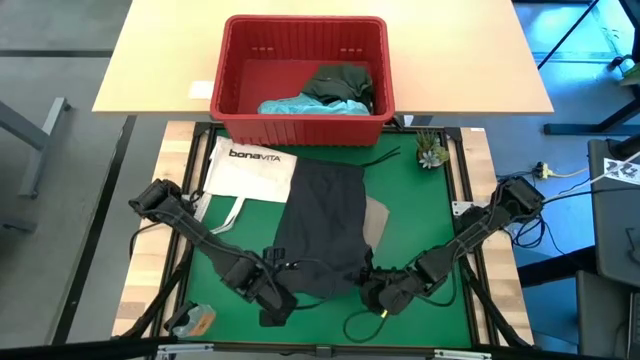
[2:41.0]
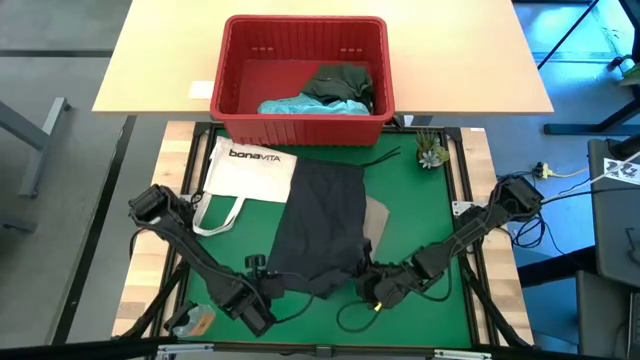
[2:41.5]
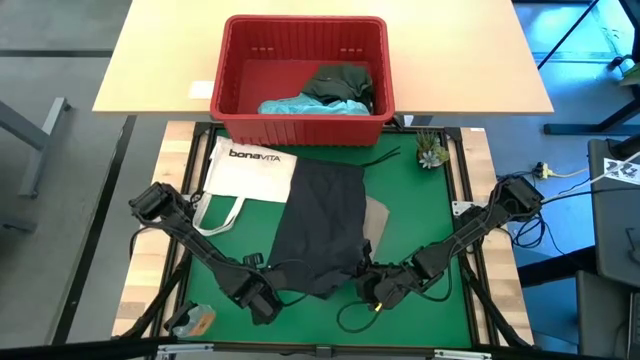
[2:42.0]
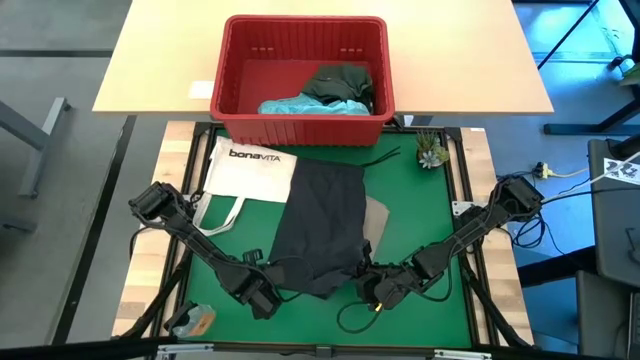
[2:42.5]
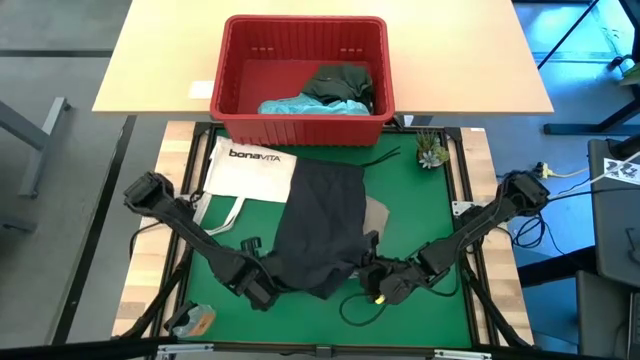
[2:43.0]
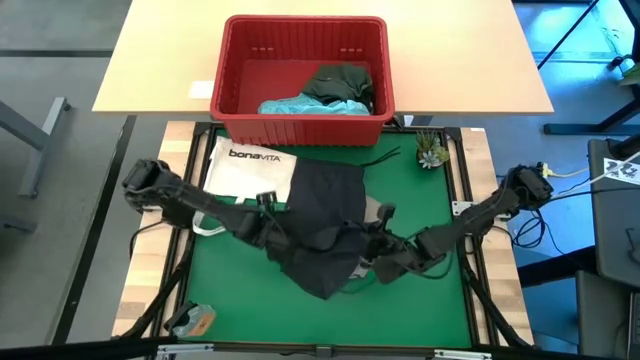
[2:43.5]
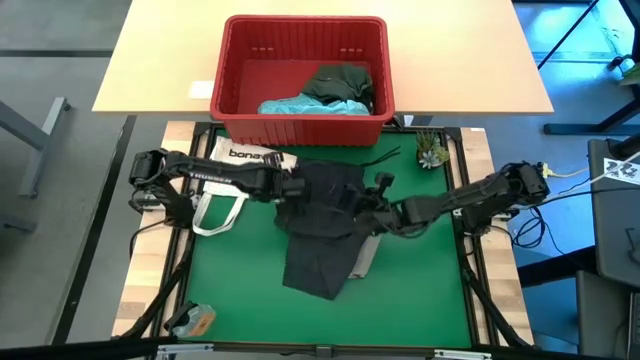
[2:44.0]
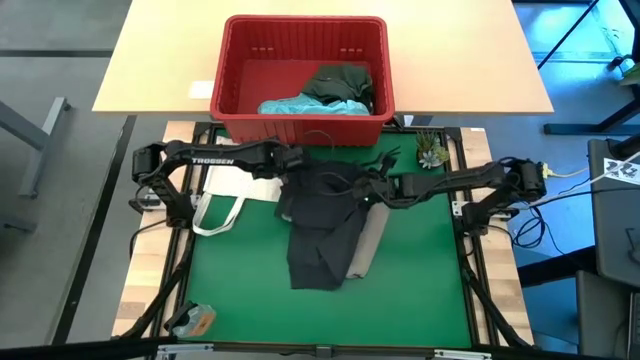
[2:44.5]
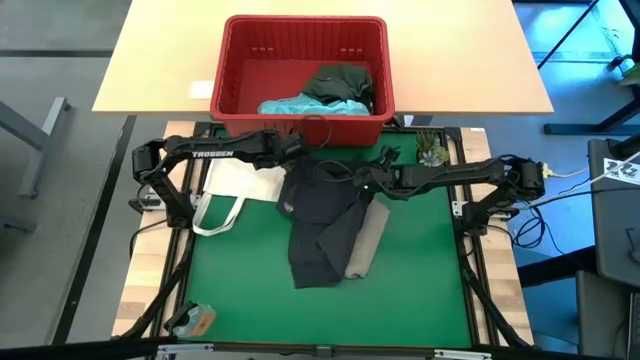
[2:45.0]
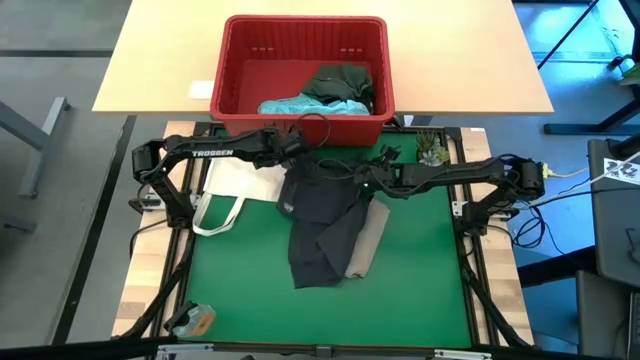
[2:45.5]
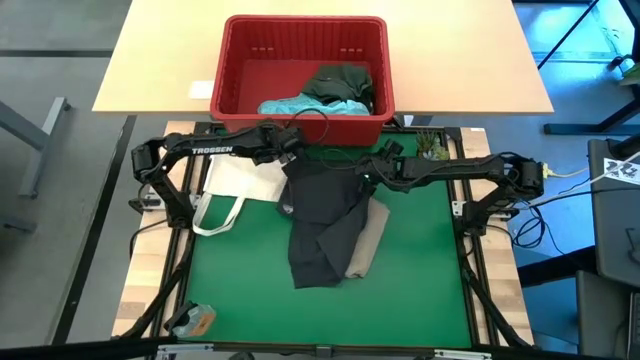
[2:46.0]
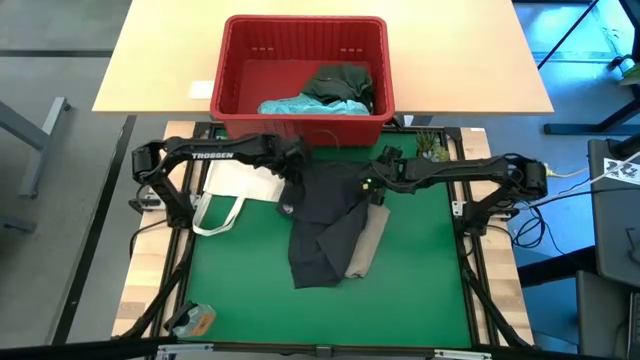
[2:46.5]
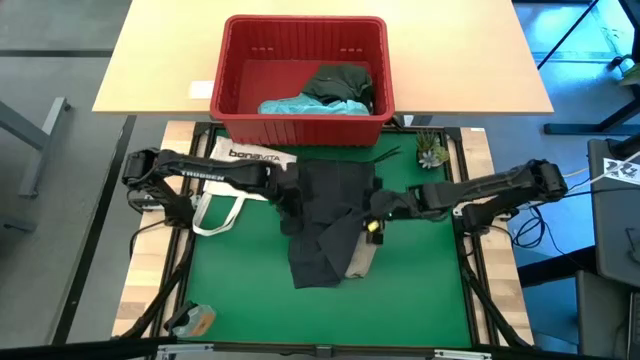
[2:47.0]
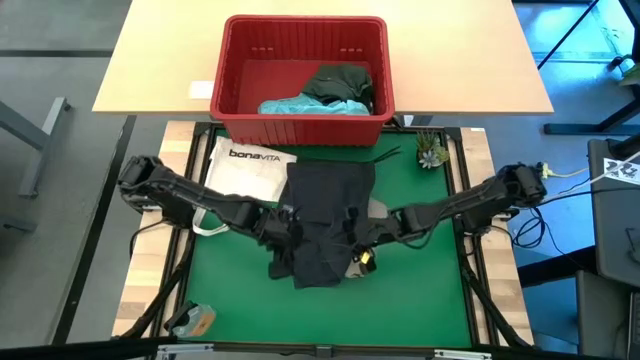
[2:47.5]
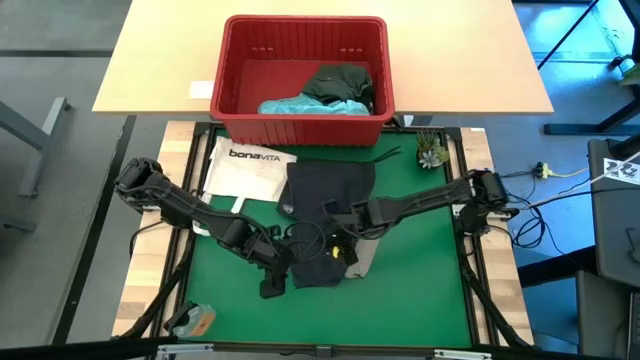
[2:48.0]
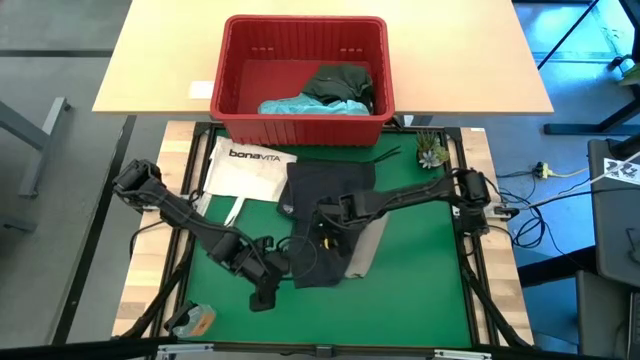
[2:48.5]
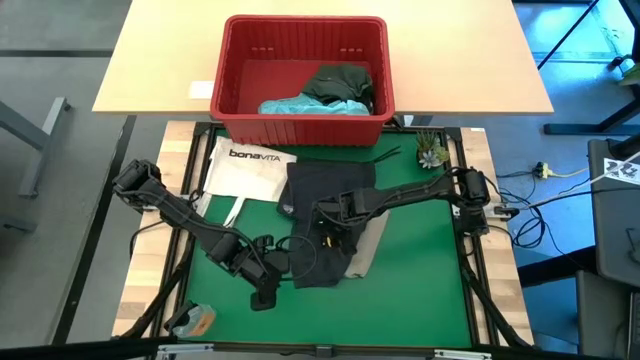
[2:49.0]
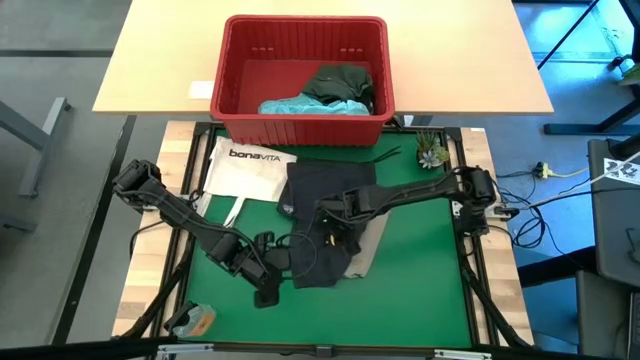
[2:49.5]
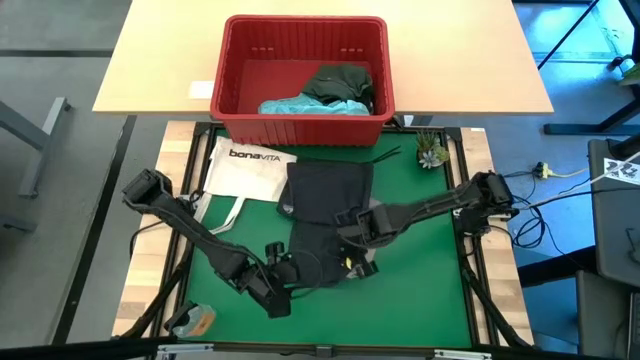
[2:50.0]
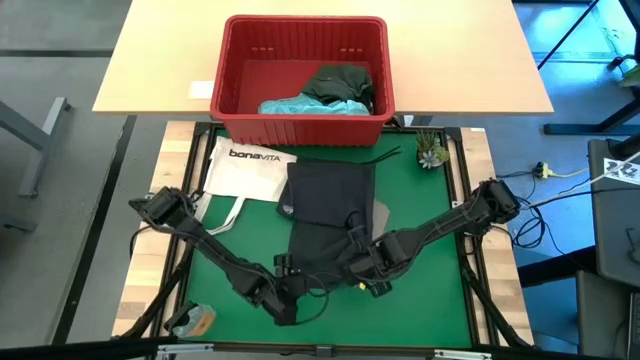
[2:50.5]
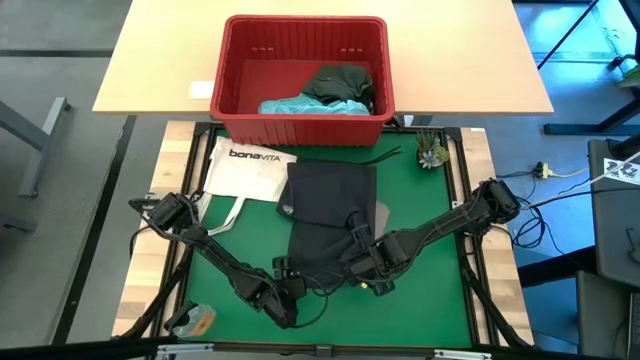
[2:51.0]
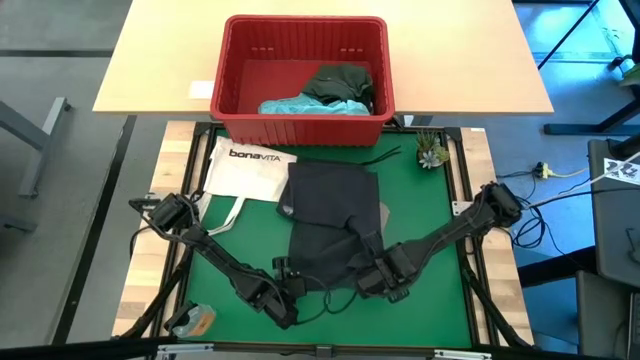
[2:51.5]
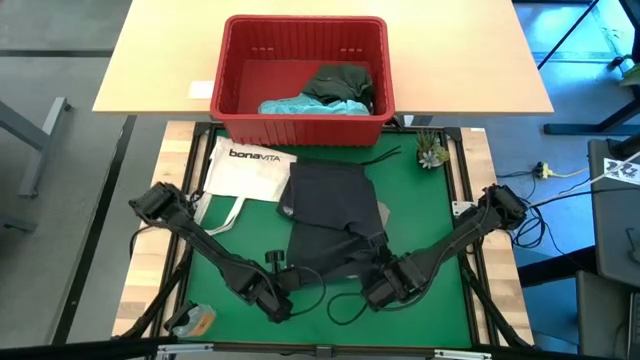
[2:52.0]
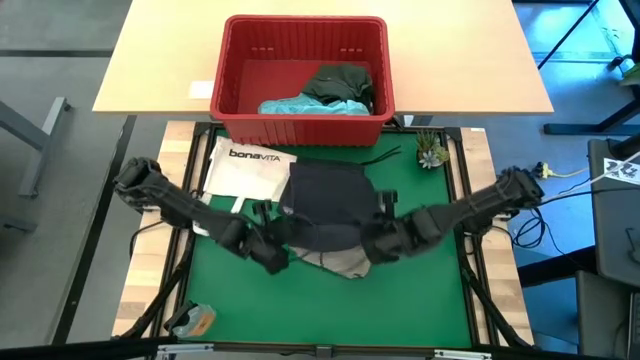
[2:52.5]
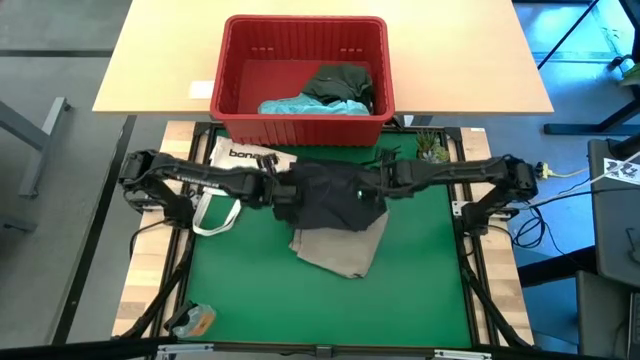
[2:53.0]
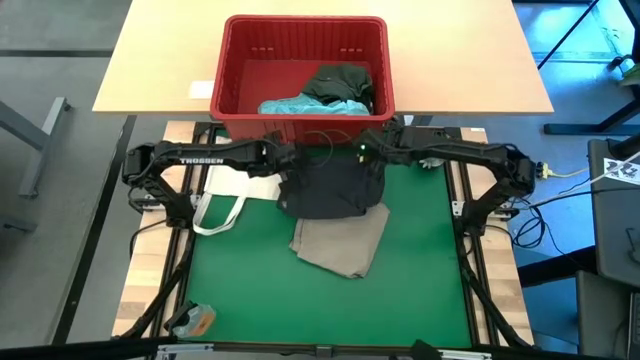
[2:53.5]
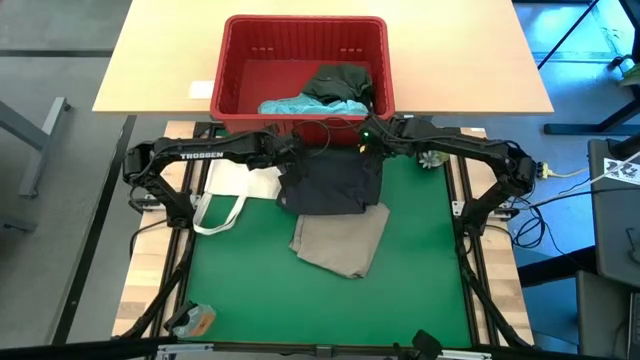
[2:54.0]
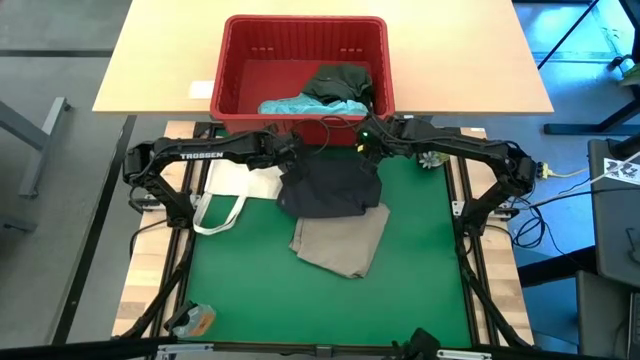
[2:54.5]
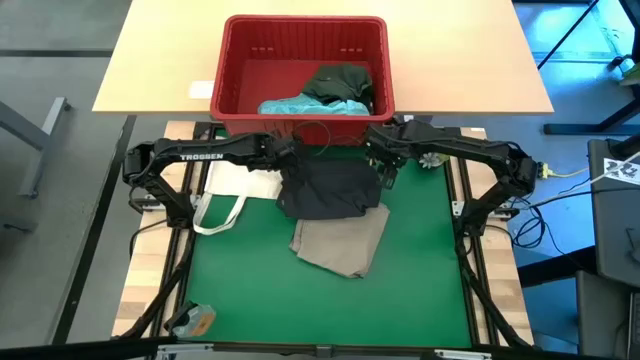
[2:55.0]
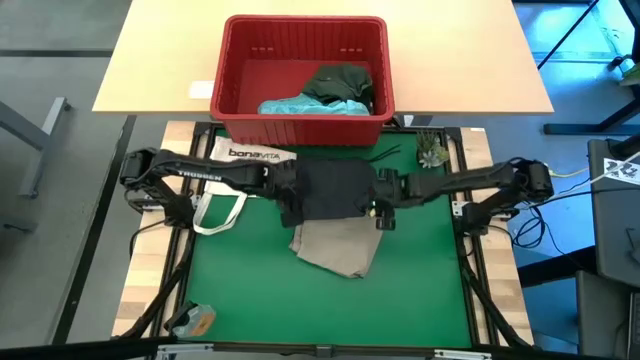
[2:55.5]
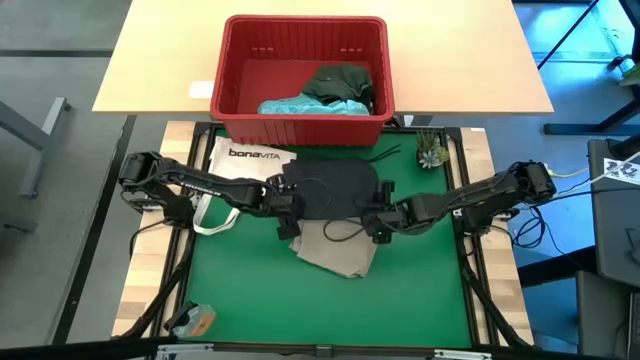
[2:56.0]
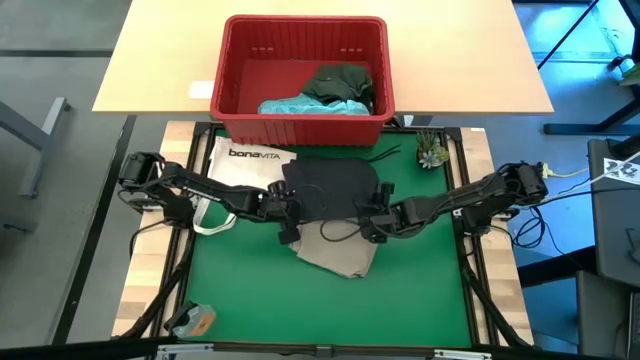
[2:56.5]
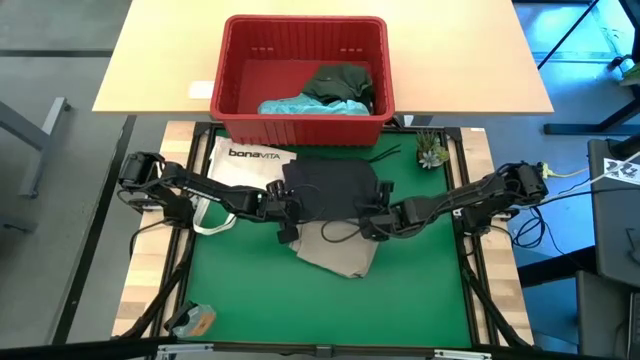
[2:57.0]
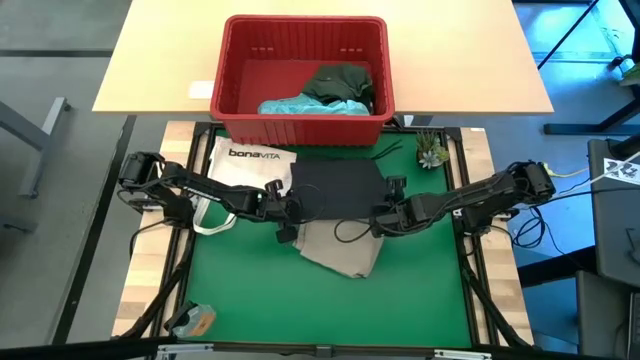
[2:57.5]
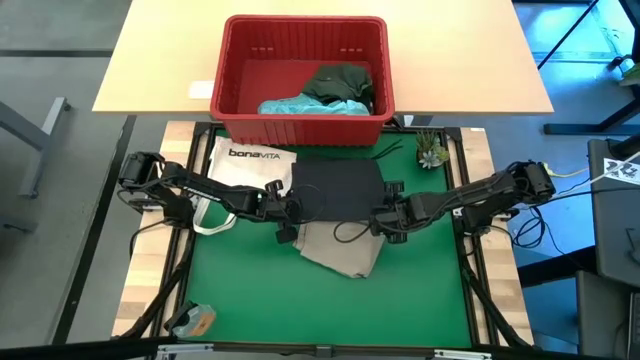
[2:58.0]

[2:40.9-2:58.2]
Task: Fold Laundry from Bin
Fold the black shorts from the red laundry bin

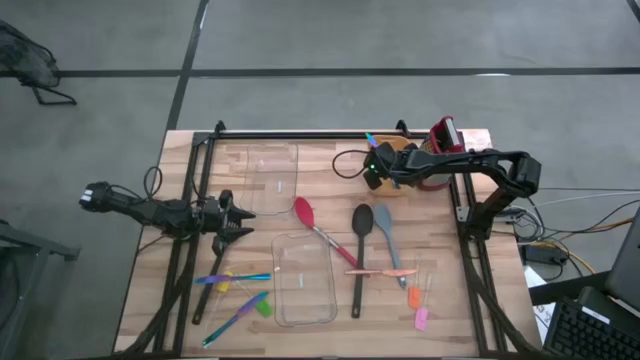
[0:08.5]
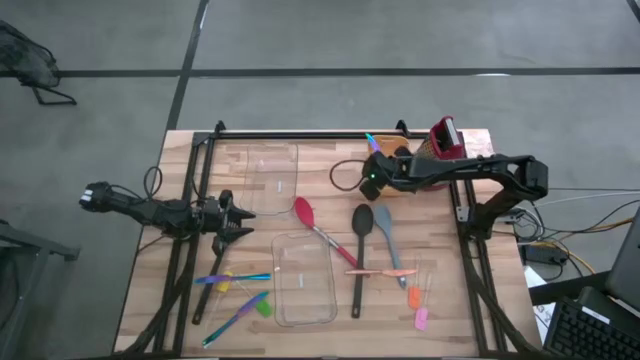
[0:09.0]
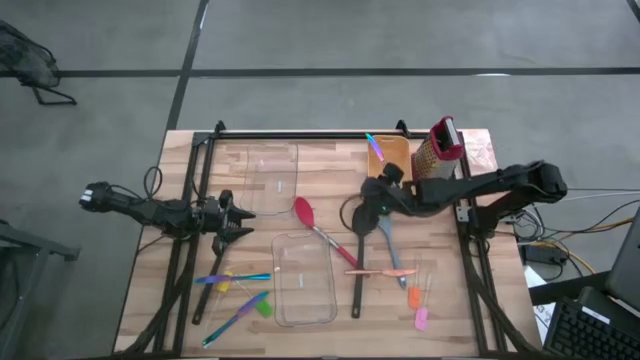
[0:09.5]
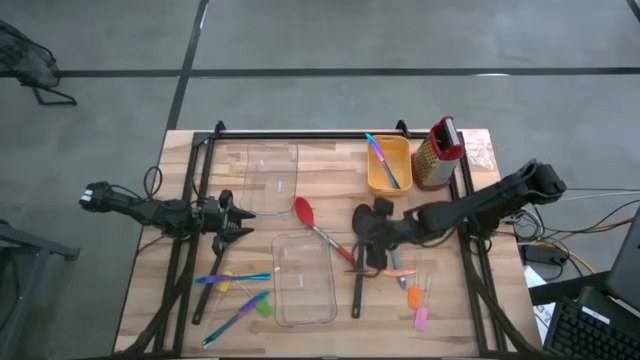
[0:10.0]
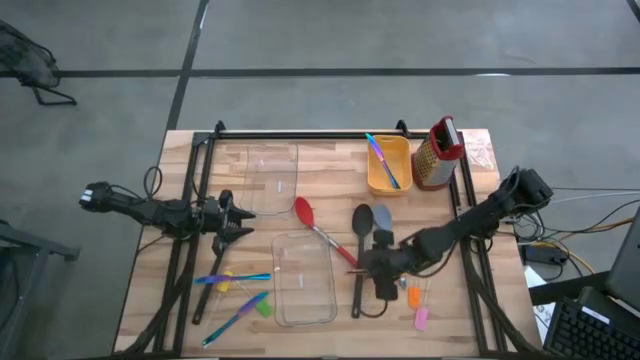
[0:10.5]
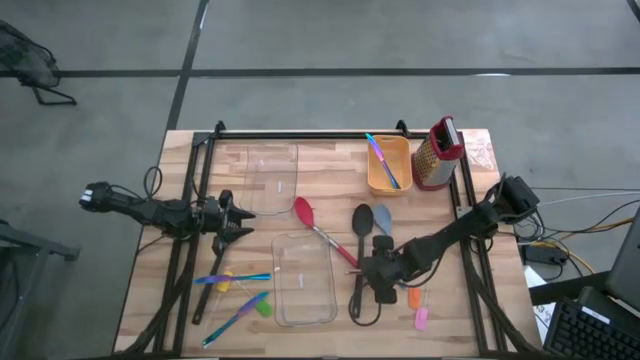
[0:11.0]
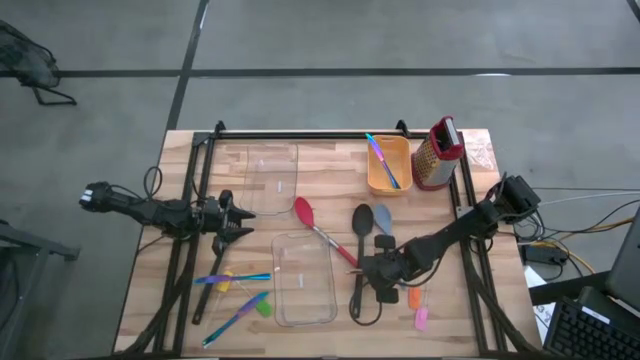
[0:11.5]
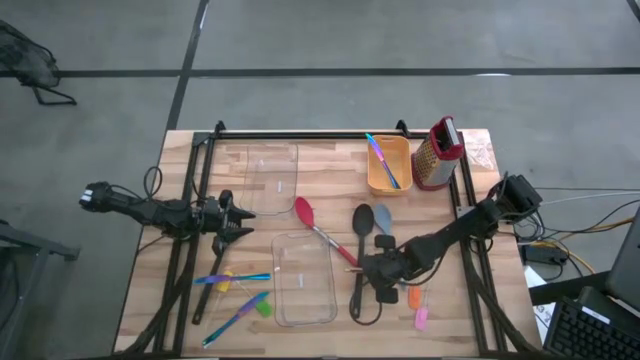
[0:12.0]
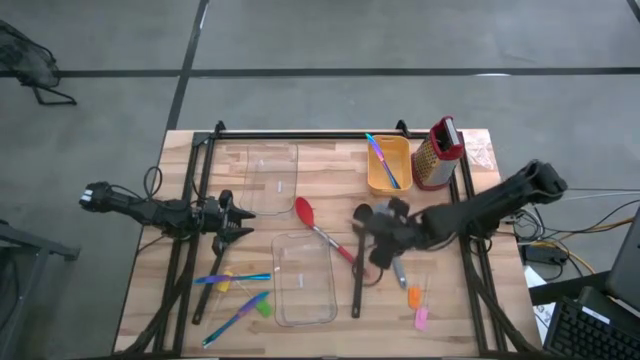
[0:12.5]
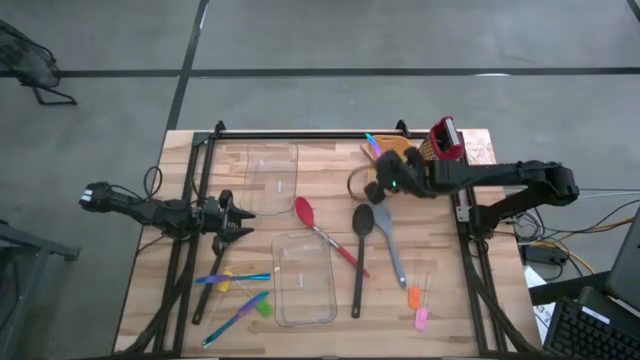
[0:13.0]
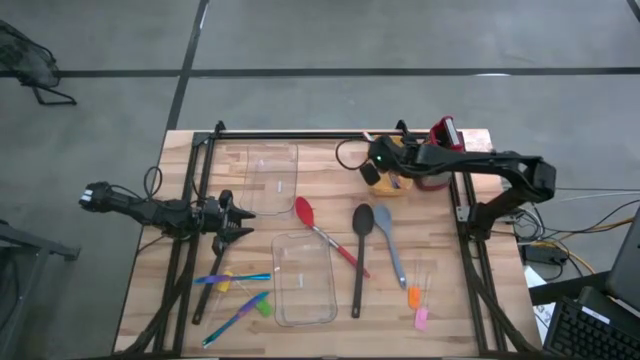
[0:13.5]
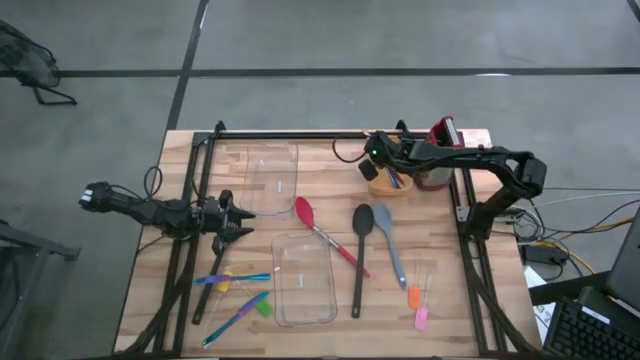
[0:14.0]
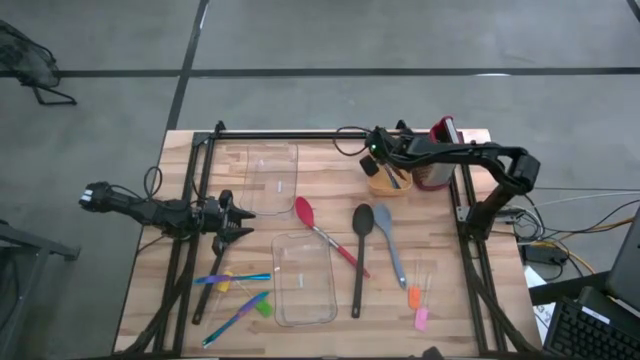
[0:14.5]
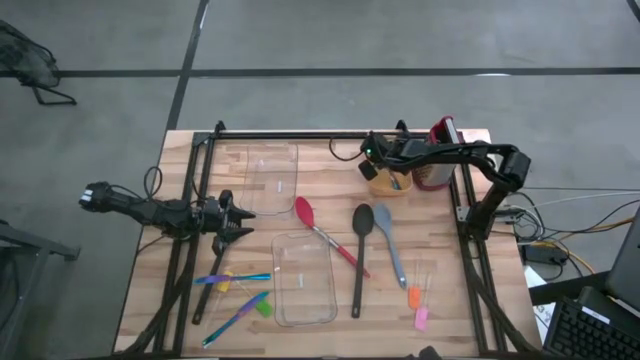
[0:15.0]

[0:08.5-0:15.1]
Task: Pick & Place Kitchen Items
Put the gold knife into the yellow bin
